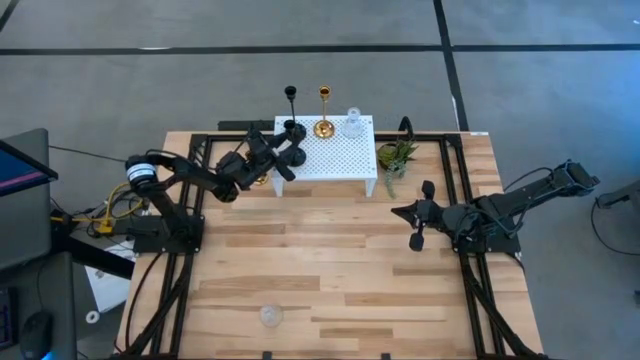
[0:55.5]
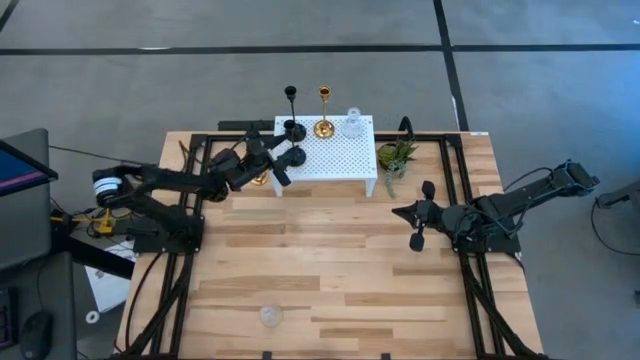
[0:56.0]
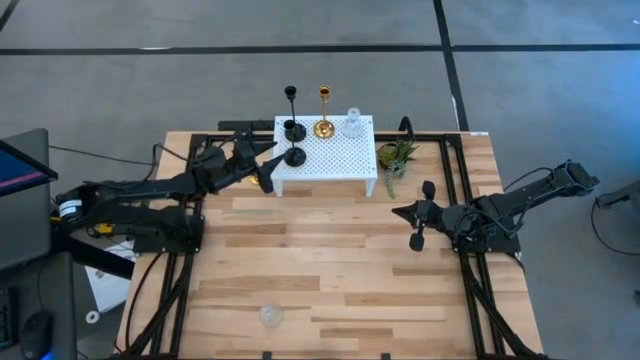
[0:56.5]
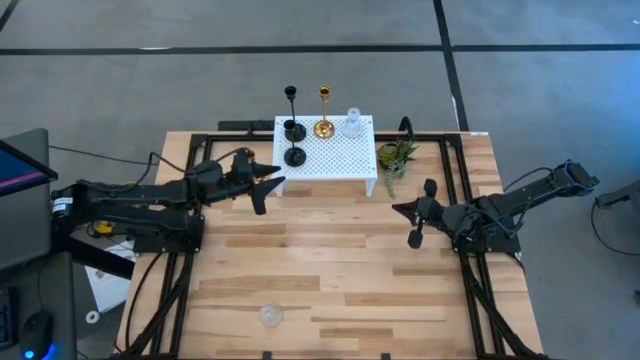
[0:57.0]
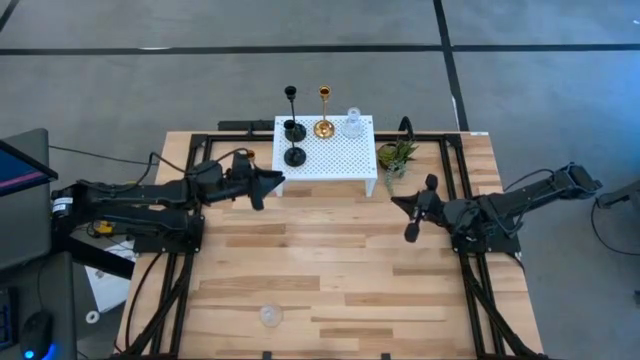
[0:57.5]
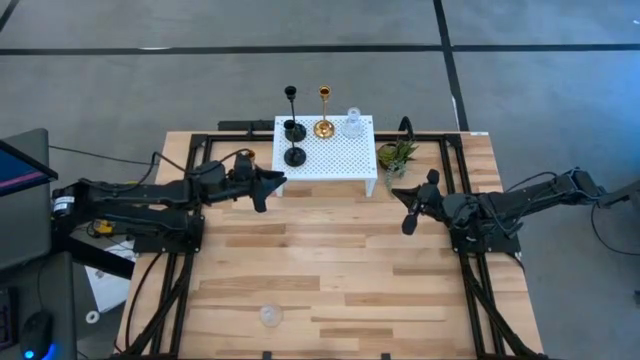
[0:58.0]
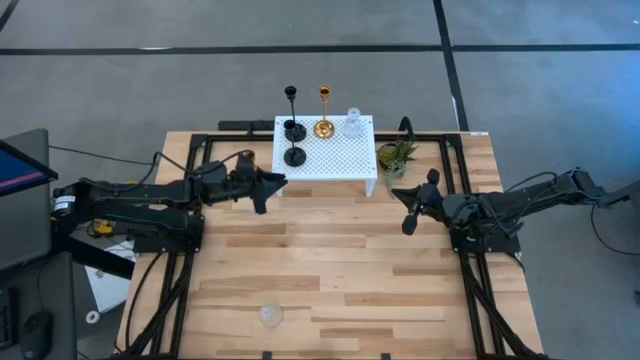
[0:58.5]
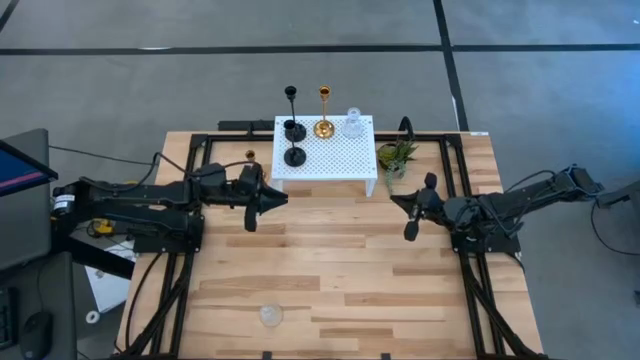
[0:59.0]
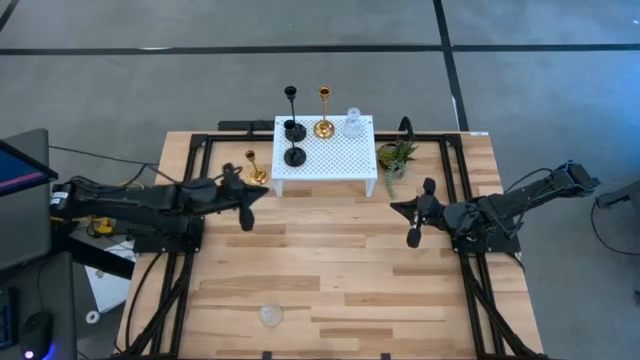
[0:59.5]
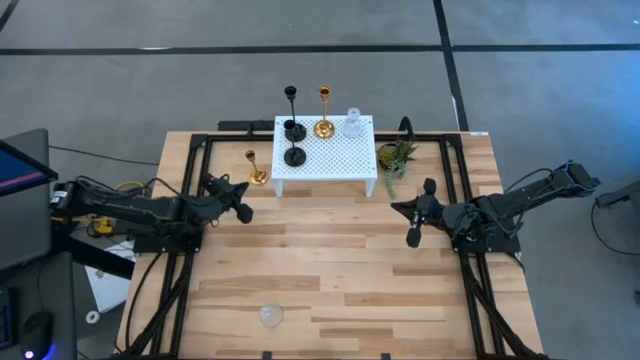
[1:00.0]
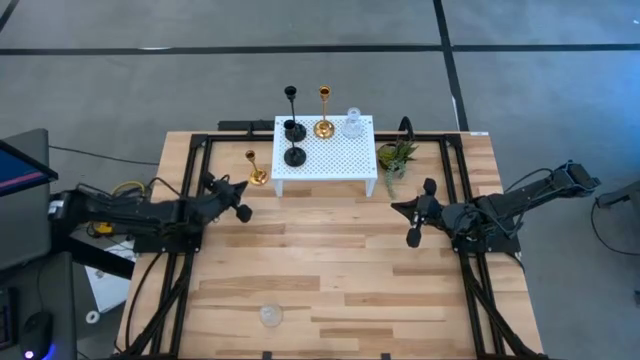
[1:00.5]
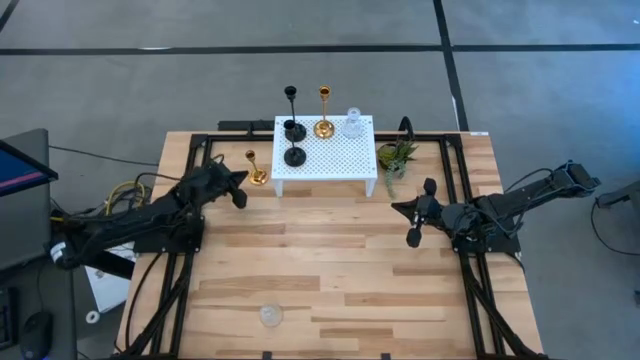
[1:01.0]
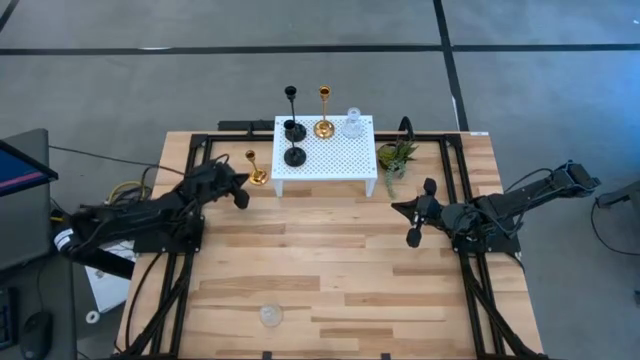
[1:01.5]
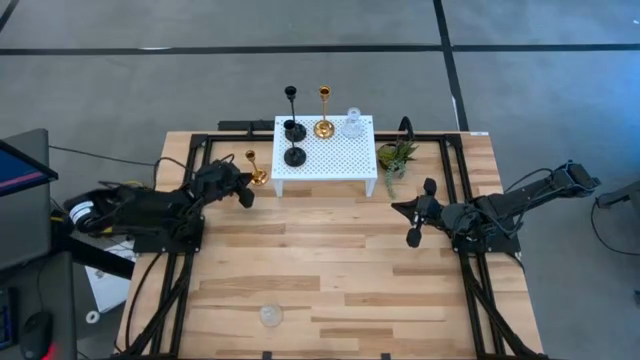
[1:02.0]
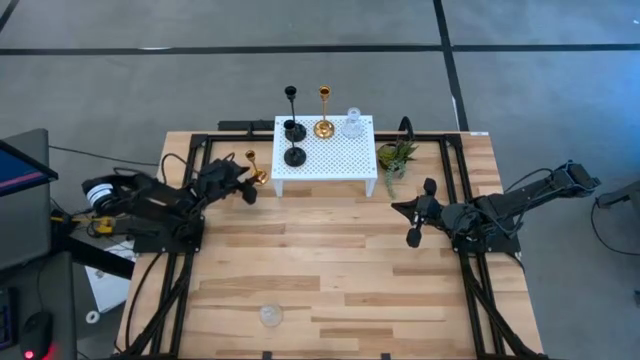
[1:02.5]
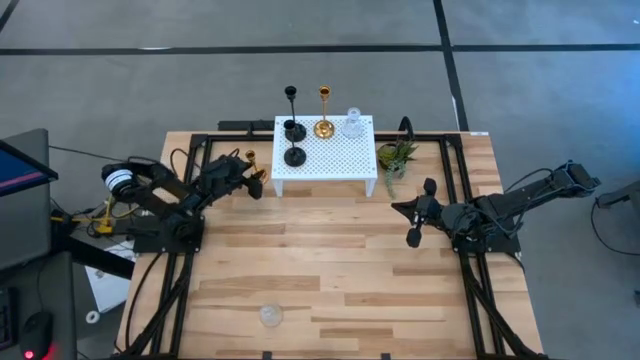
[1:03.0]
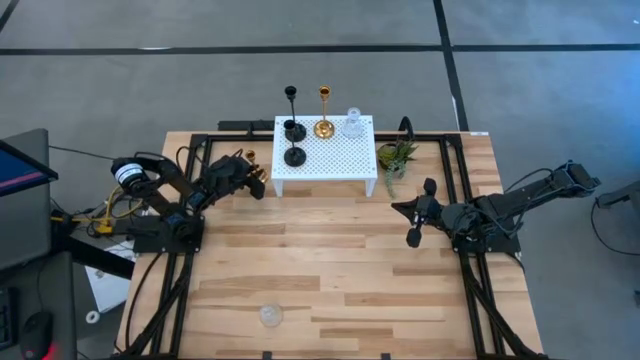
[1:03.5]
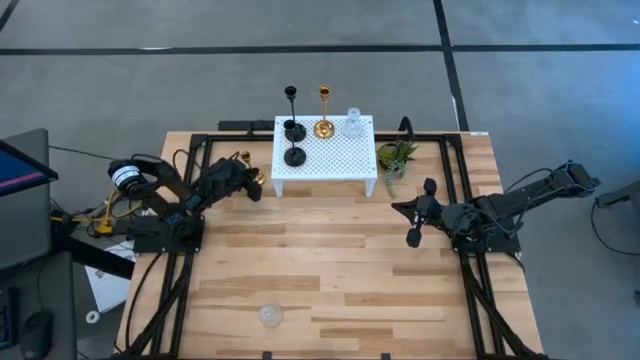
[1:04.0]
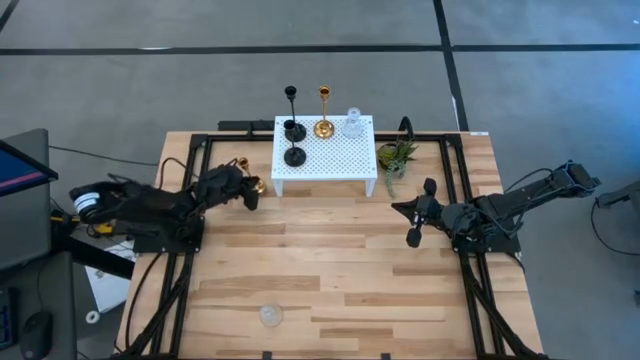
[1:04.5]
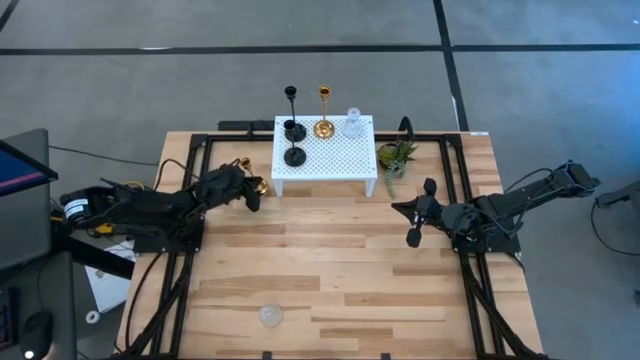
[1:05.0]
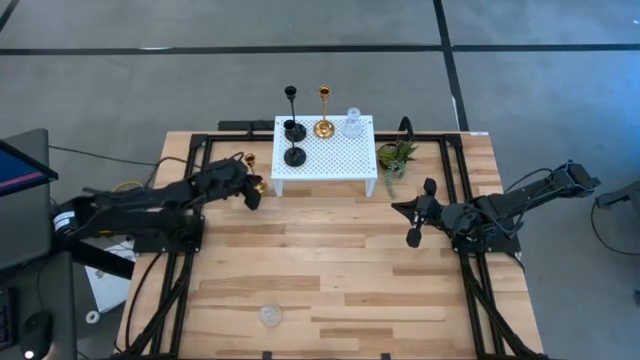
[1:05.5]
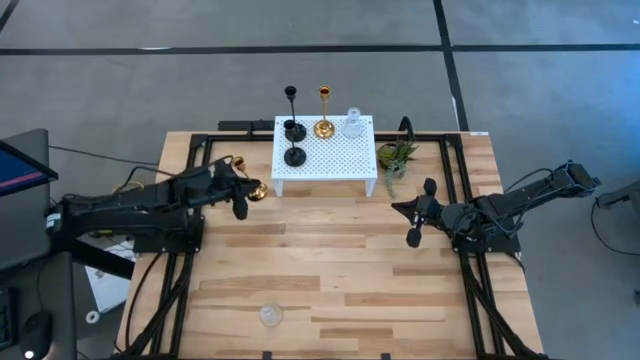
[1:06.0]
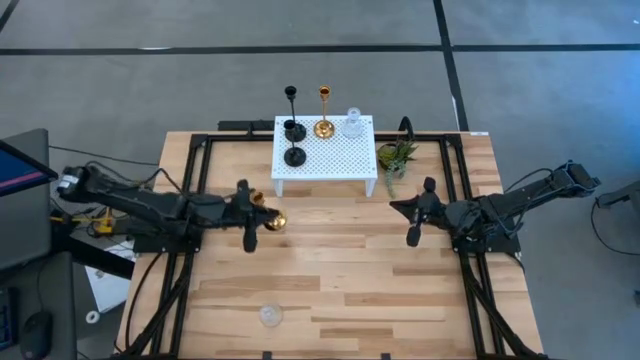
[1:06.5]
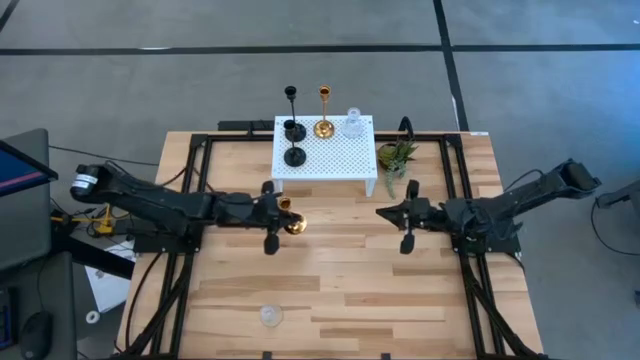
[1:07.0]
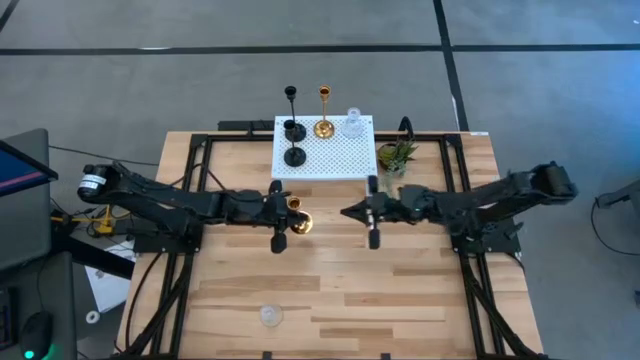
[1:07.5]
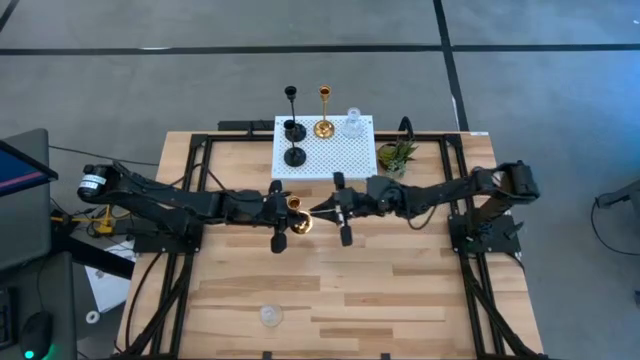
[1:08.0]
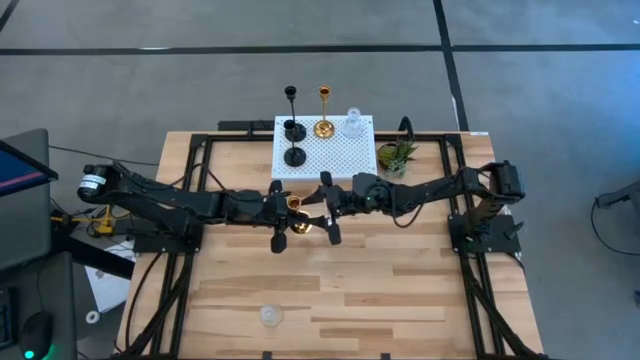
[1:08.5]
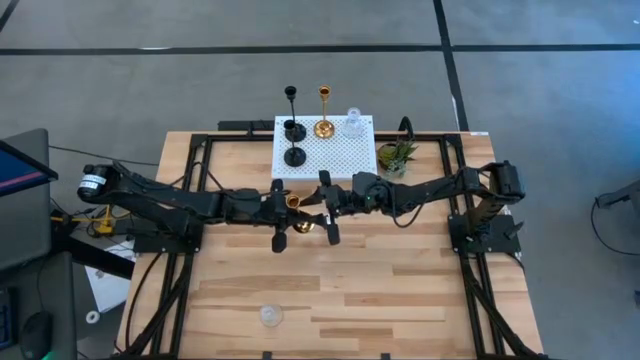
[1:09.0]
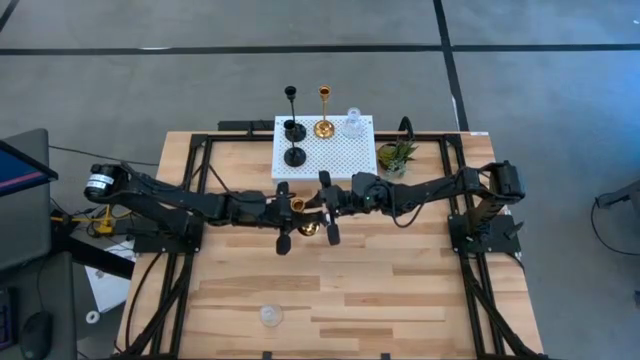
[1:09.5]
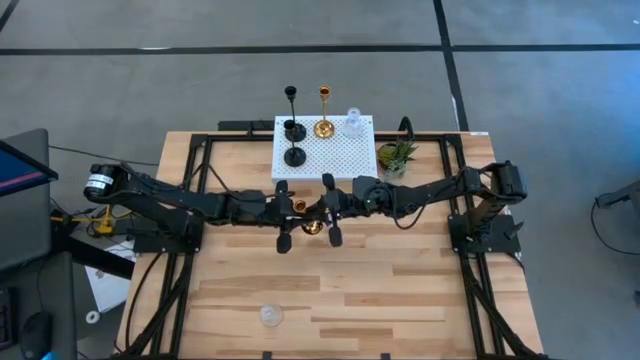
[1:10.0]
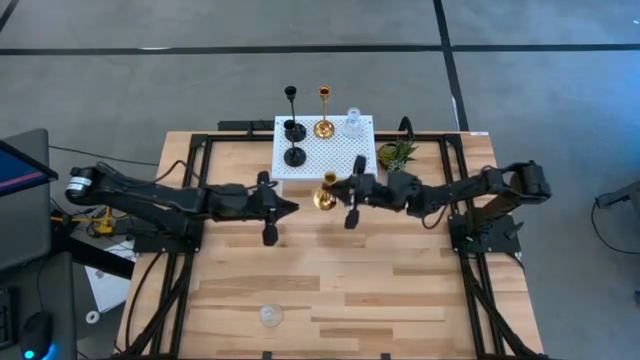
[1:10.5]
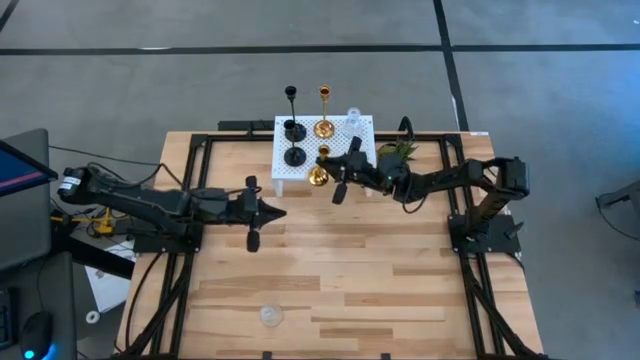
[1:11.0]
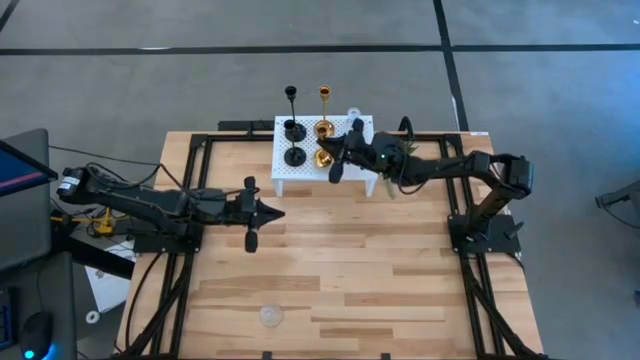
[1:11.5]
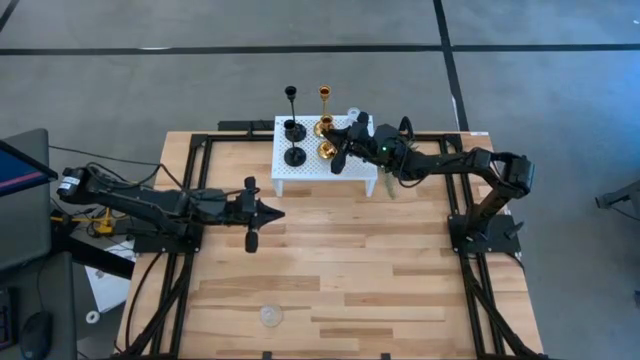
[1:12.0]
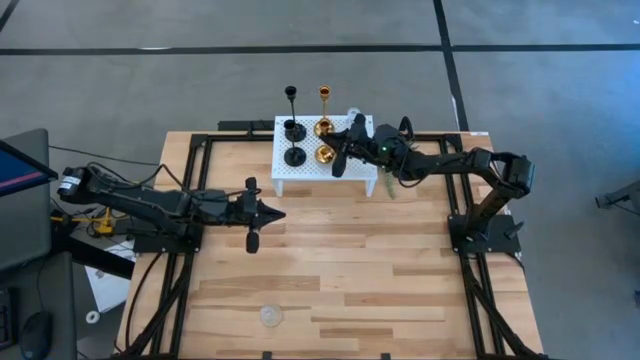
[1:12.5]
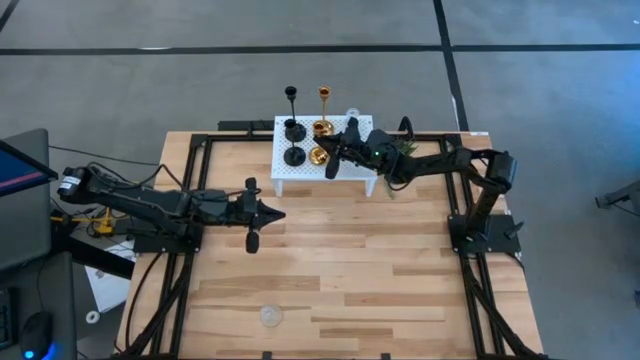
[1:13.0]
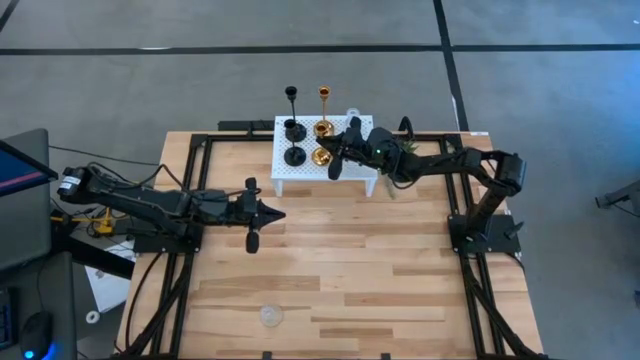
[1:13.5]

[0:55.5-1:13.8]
Task: Pick & Place candle stick holders
Put the gold candle holder on the shelf aligned with the other gold candle holder

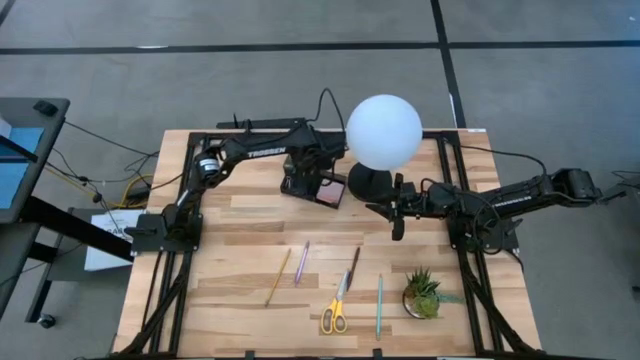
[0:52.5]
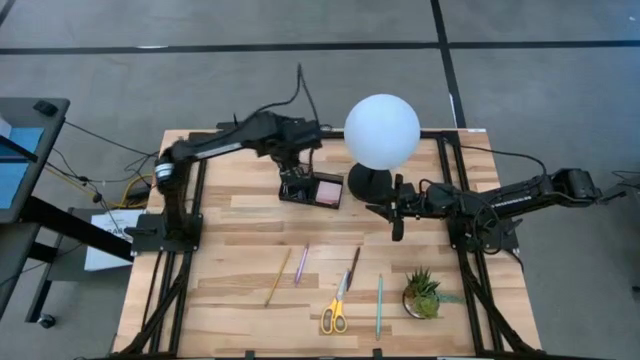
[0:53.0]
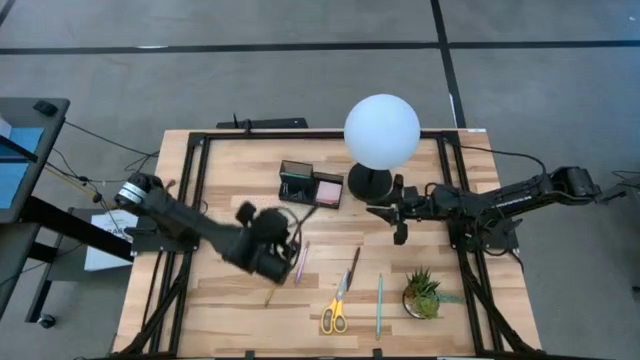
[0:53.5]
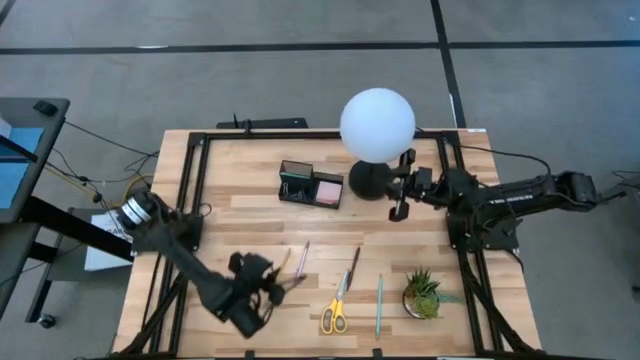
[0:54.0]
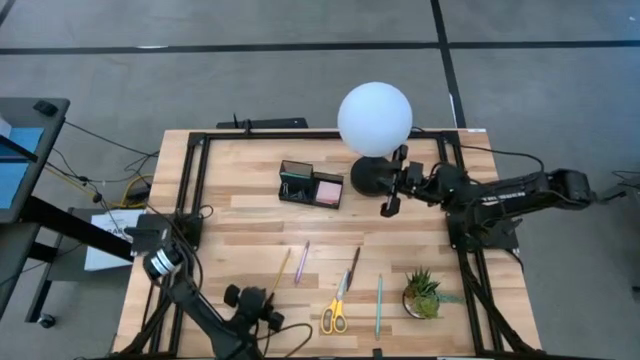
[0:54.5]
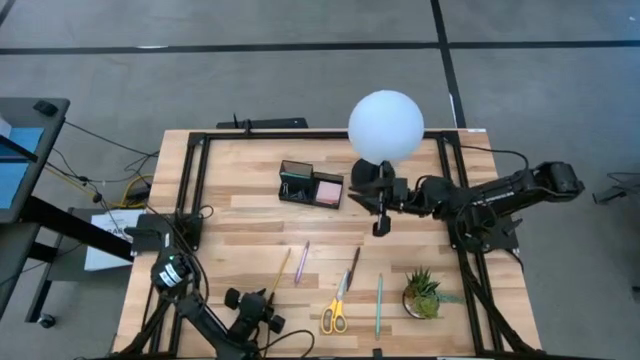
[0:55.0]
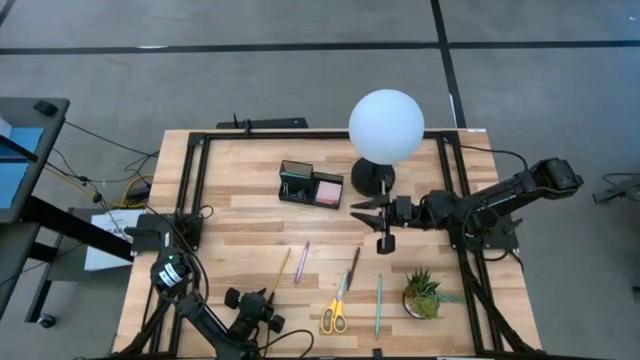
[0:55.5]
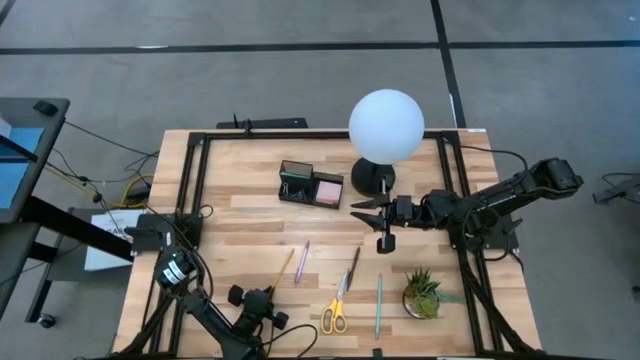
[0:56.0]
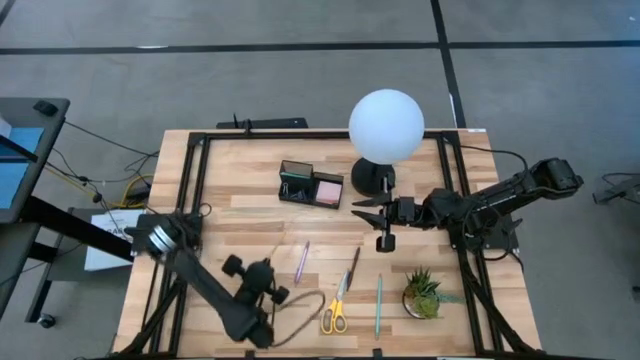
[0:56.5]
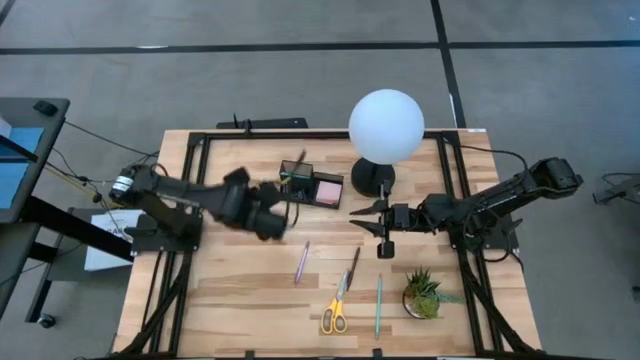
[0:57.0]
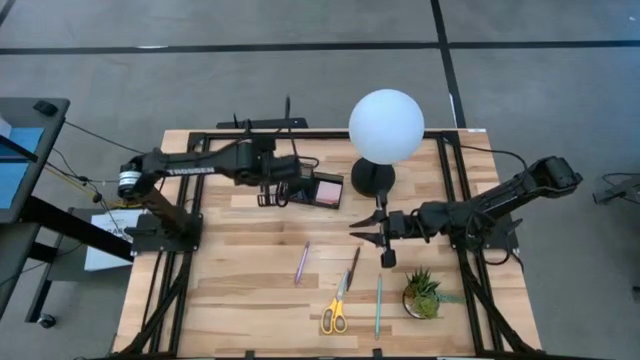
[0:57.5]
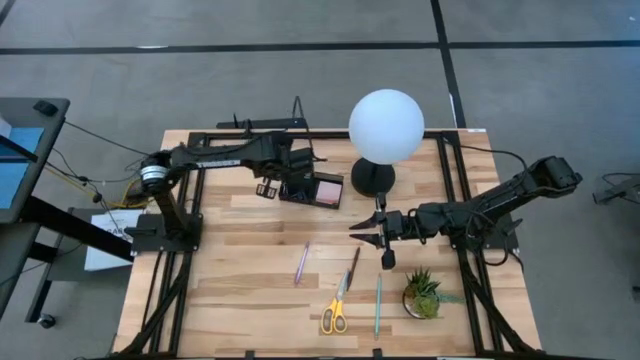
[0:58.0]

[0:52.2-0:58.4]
Task: Pick and place office supplies into organizer
Put the yellow pencil into the black desk organizer
